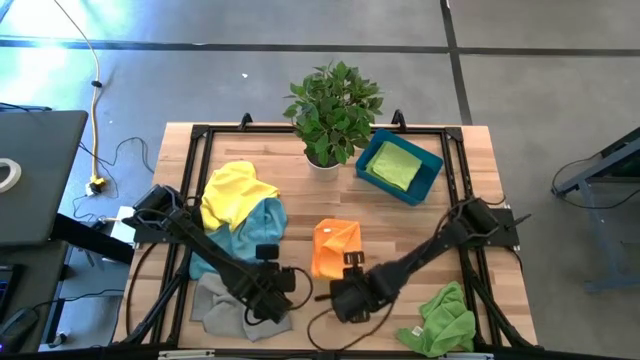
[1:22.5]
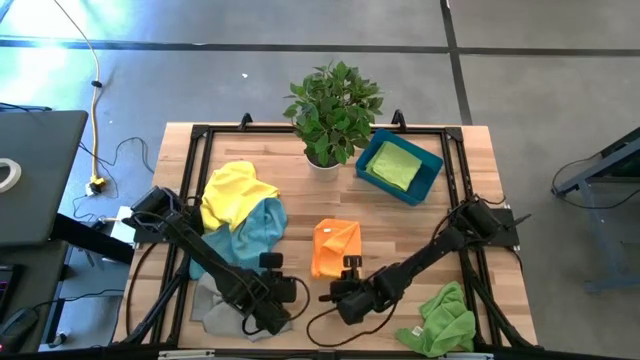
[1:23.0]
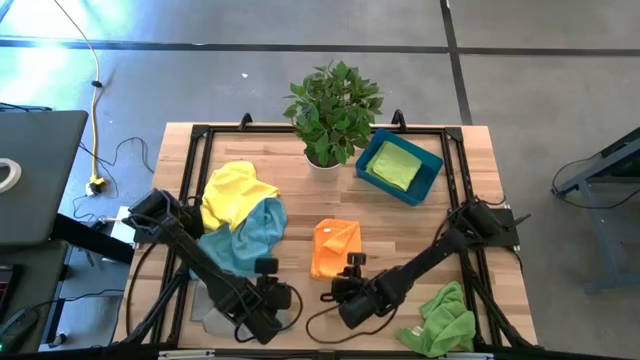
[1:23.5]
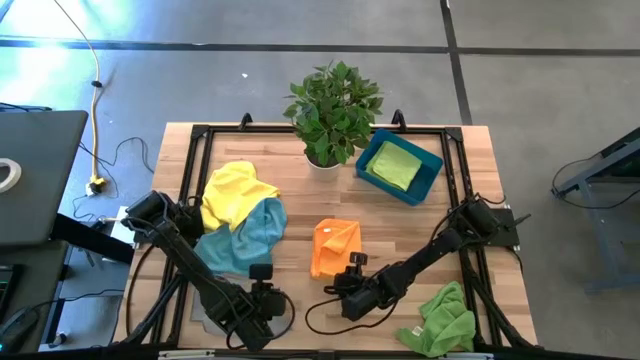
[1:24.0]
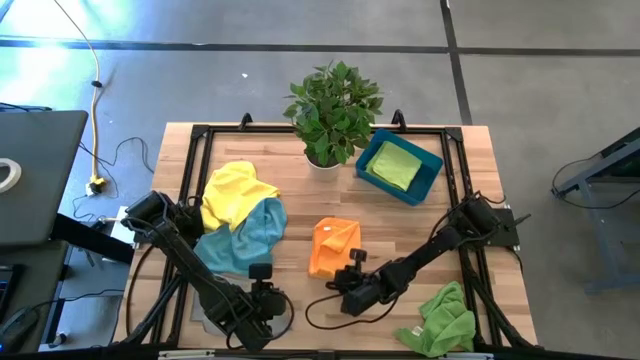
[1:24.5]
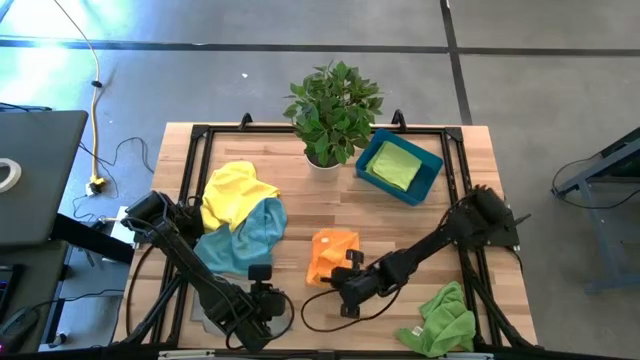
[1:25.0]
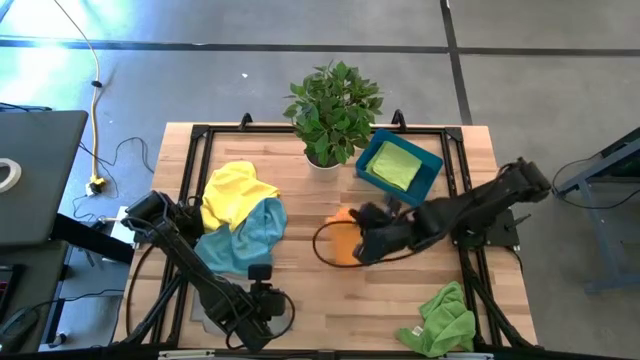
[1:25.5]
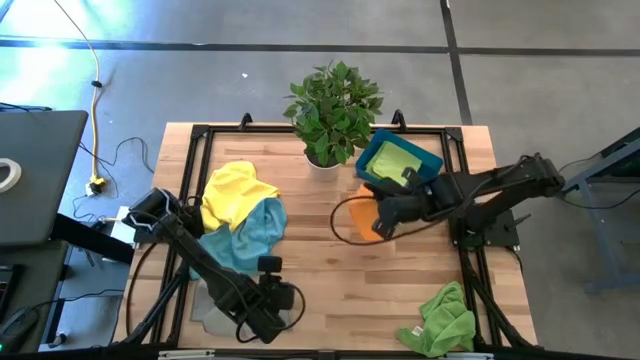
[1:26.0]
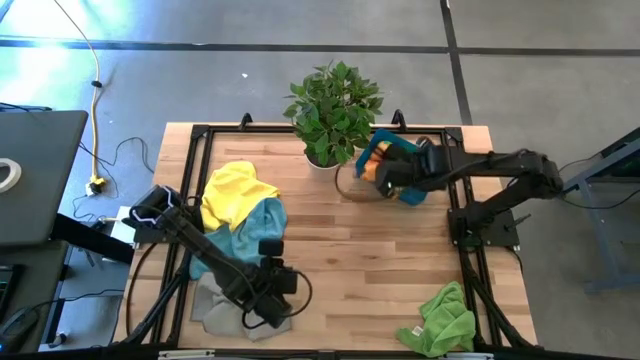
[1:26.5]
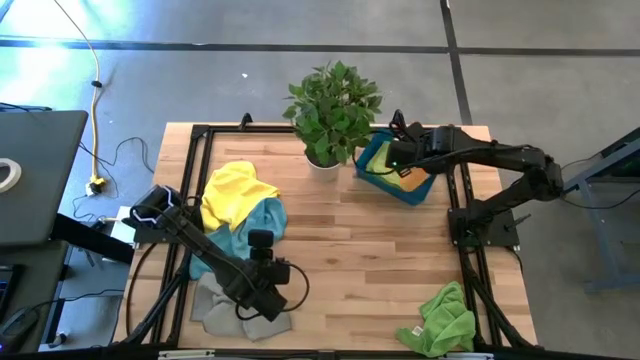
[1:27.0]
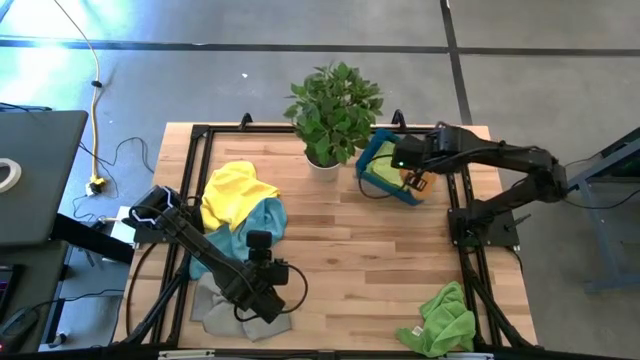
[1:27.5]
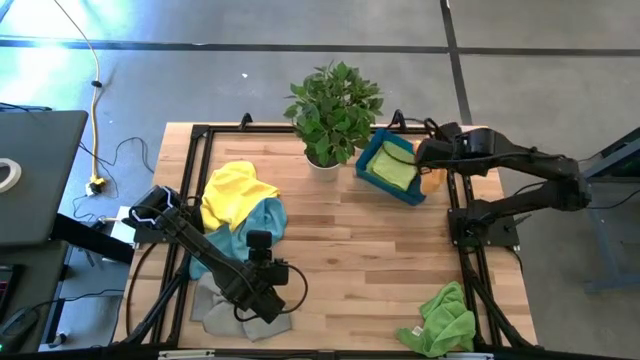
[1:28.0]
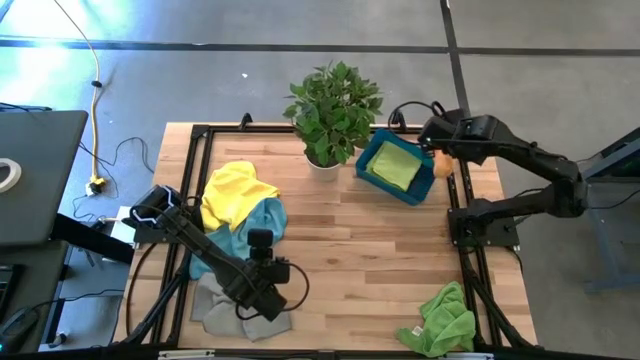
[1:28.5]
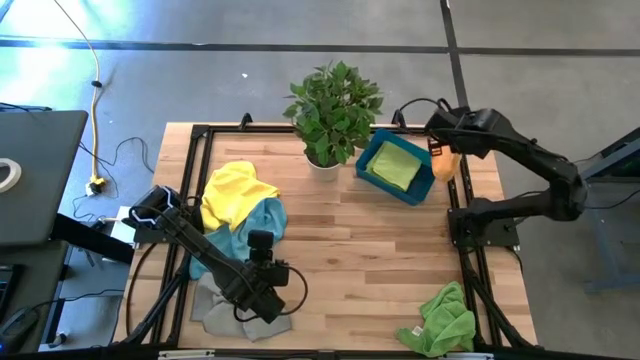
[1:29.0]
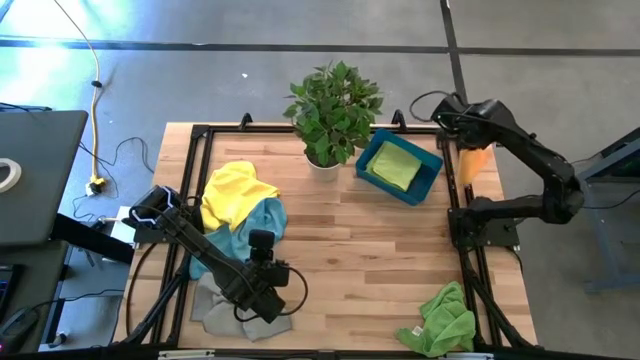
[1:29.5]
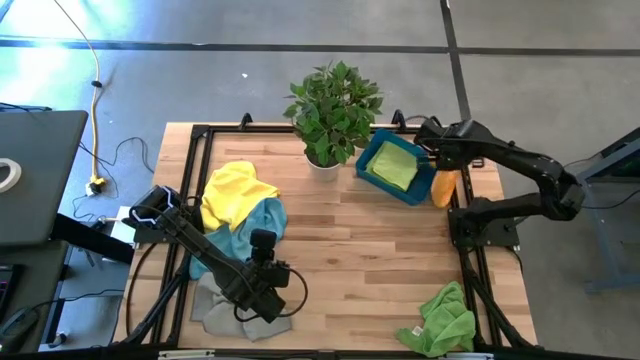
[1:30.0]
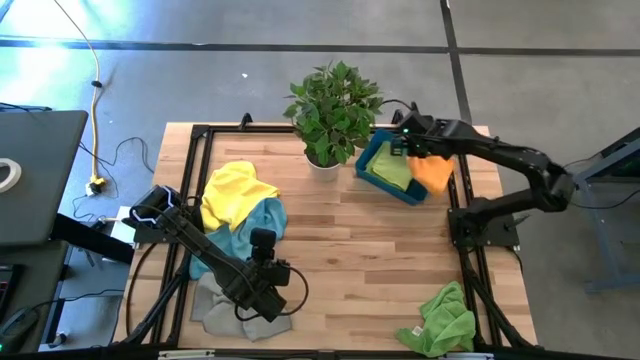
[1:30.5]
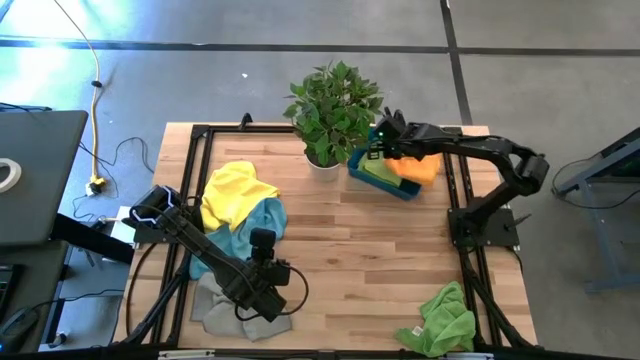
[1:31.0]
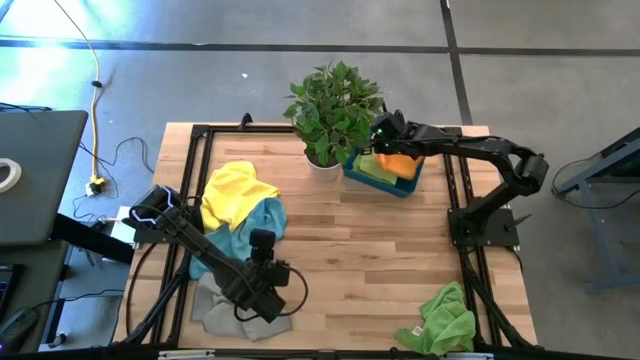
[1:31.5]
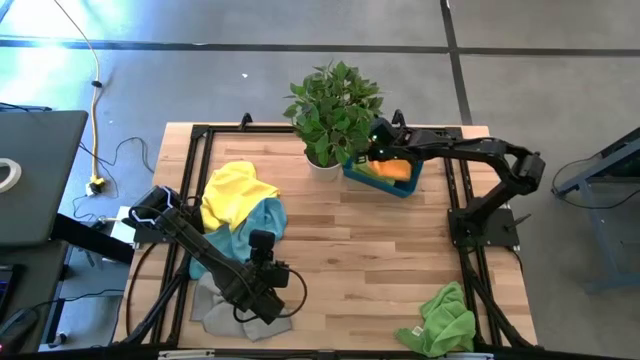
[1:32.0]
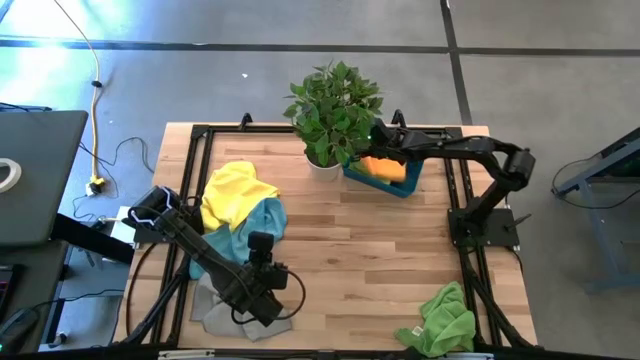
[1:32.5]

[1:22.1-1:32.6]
Task: Fold microfiber towels
Put the orange towel into the blue bin

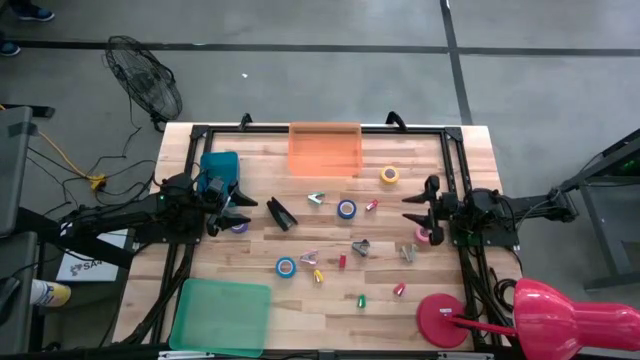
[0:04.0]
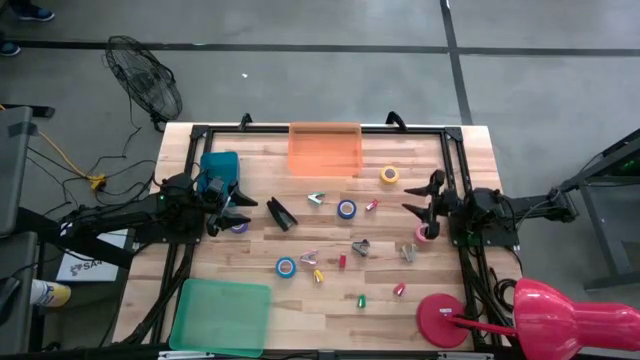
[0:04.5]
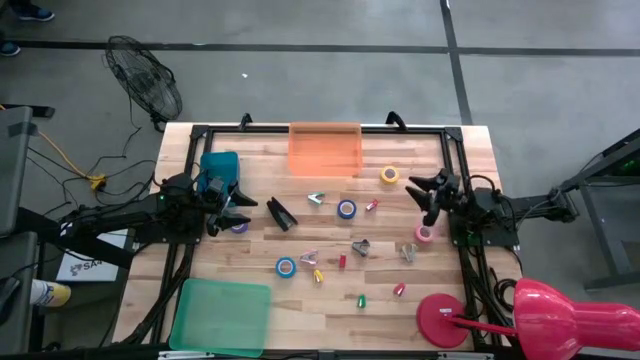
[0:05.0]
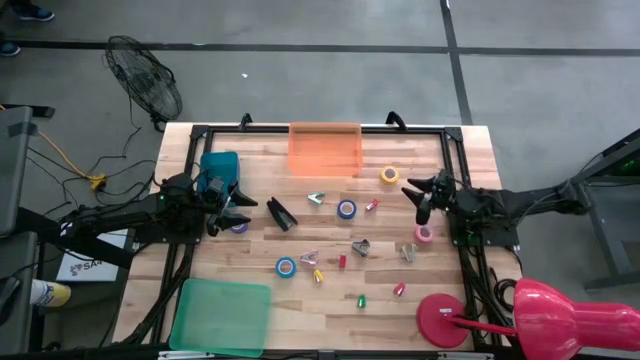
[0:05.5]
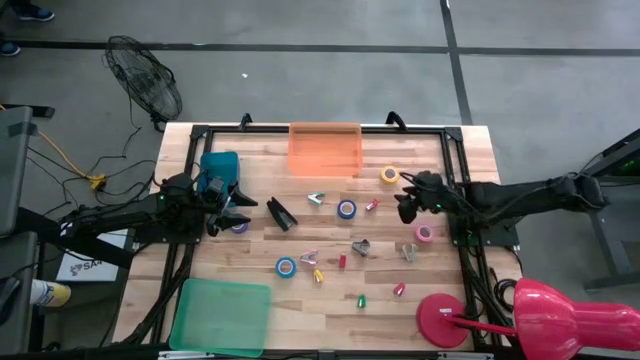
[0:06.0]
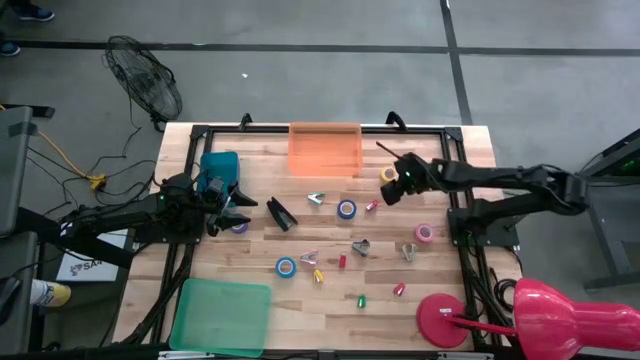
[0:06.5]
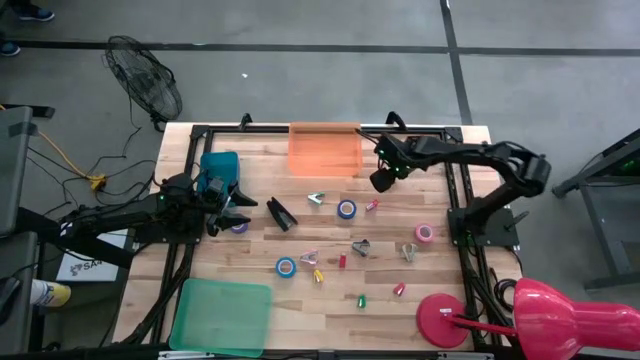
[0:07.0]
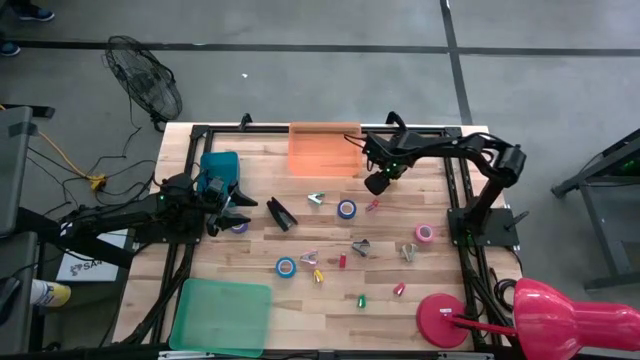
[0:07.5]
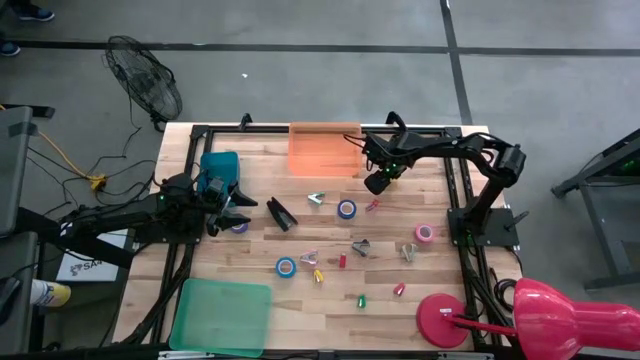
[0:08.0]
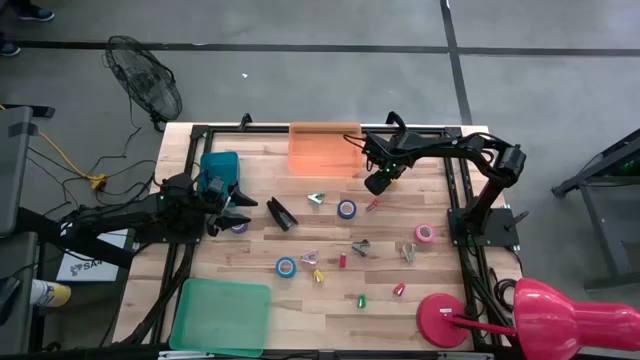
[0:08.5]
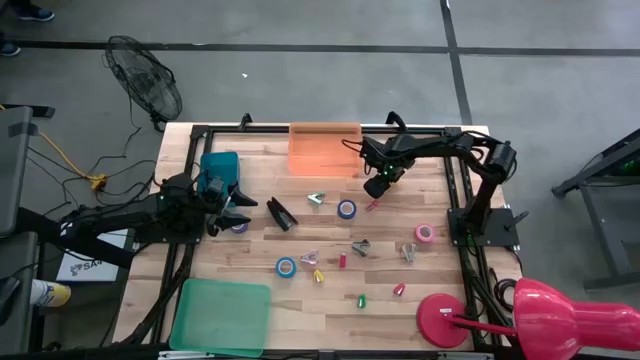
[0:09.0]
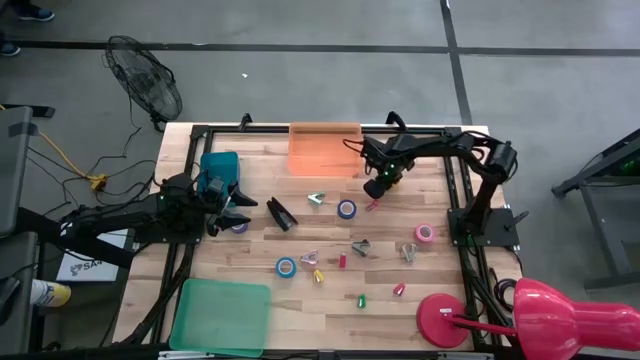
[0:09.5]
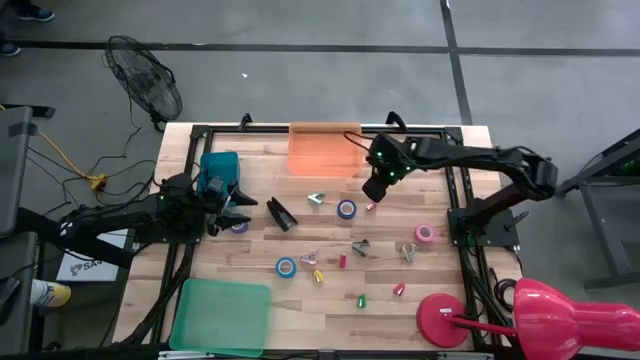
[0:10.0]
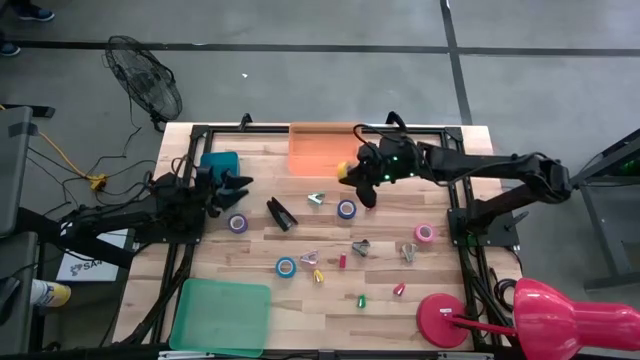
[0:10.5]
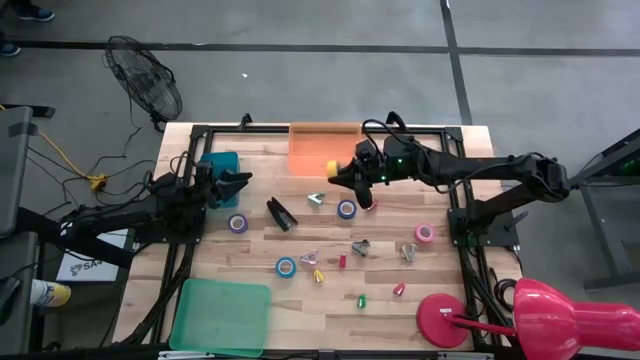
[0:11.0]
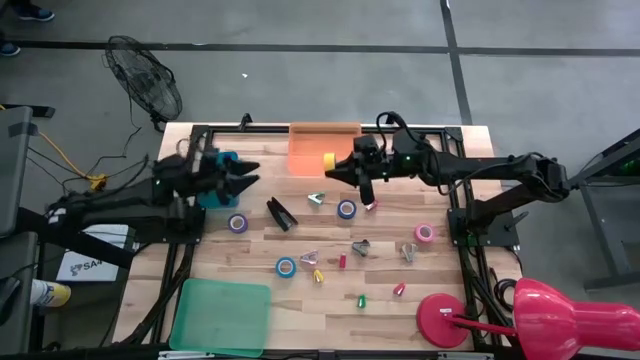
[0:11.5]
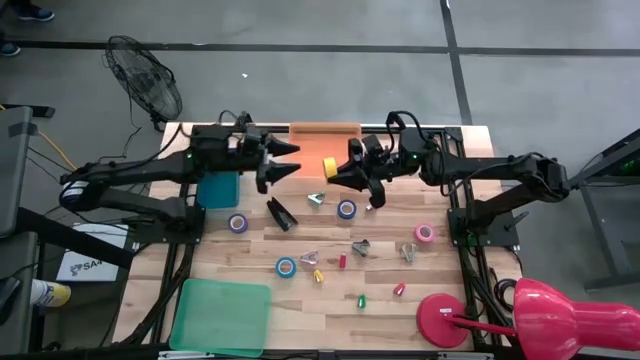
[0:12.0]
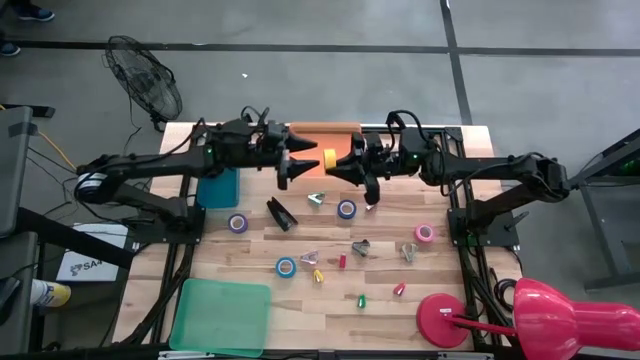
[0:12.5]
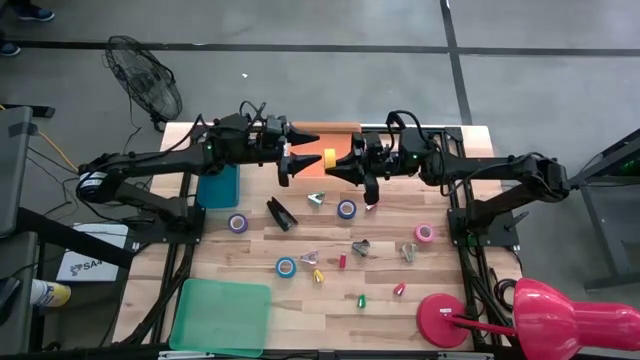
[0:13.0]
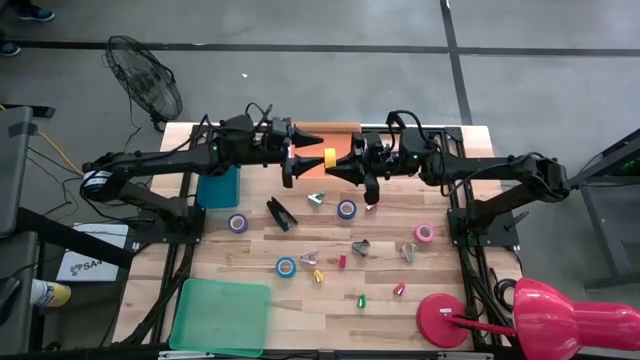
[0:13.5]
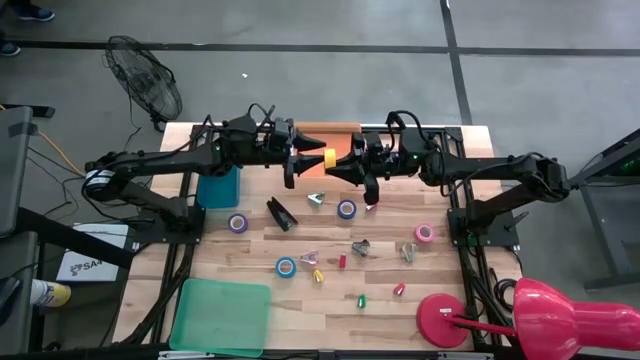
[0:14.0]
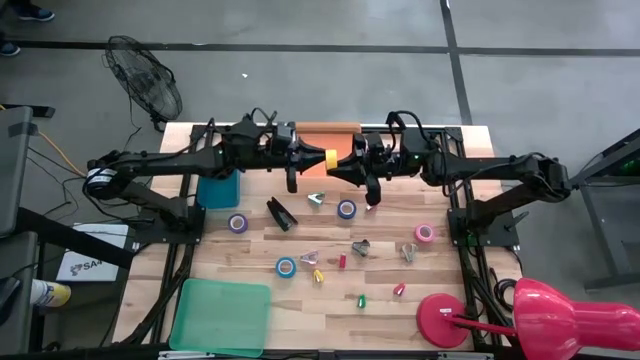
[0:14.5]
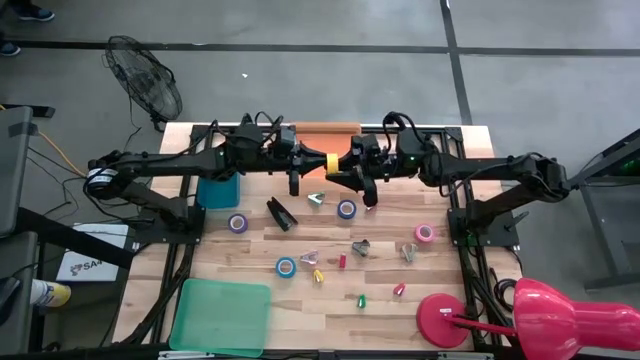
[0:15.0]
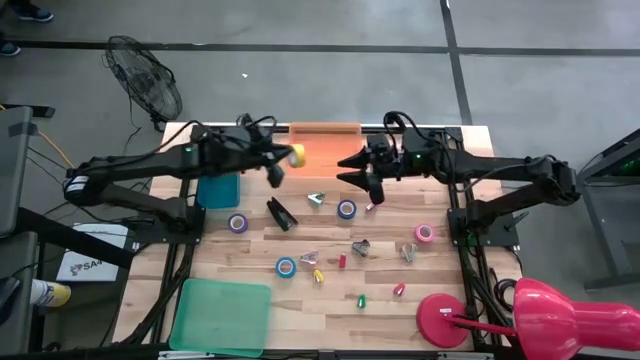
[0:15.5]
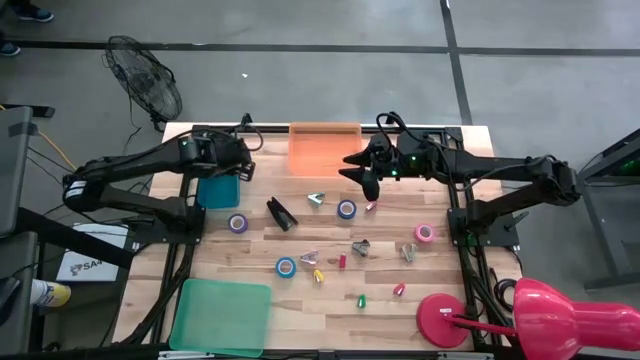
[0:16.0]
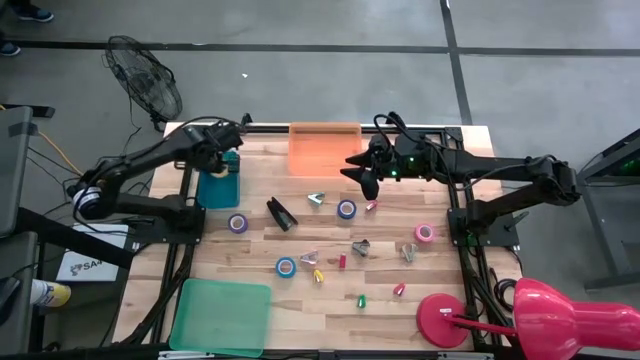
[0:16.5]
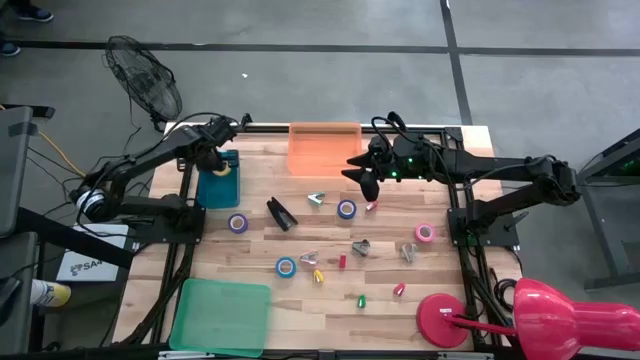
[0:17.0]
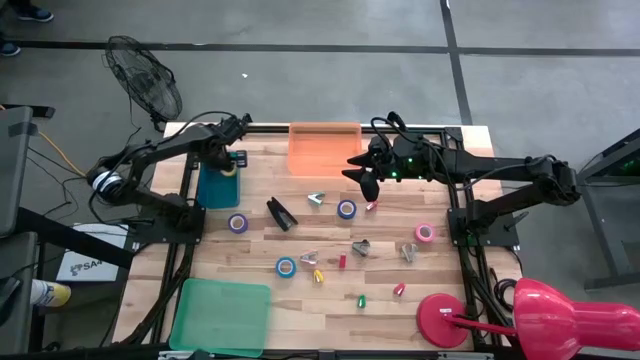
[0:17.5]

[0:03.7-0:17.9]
Task: Pick and place Stapler, Stapler remover, tape
Put the yellow tape into the blue bin
